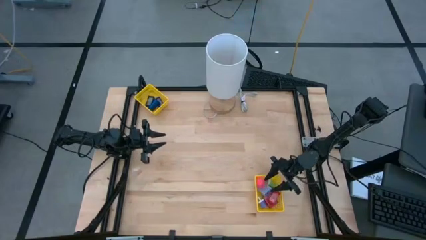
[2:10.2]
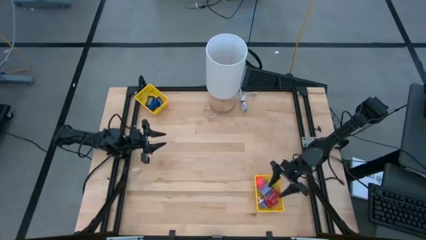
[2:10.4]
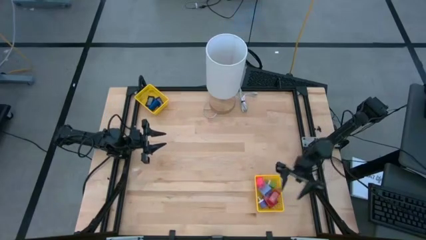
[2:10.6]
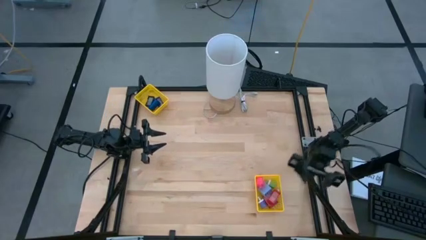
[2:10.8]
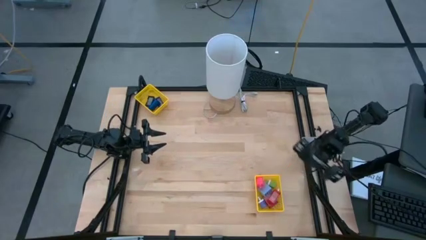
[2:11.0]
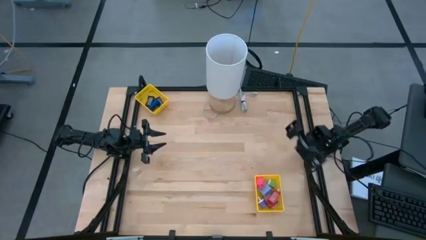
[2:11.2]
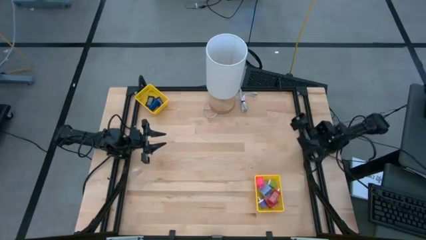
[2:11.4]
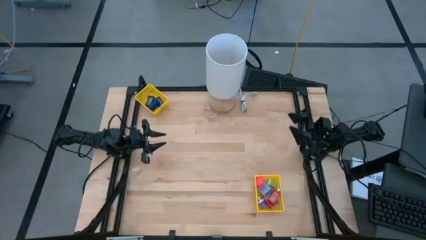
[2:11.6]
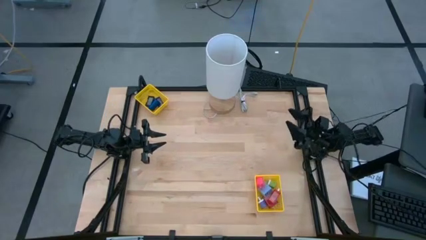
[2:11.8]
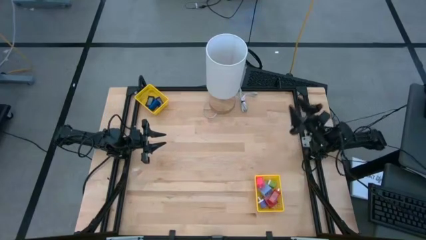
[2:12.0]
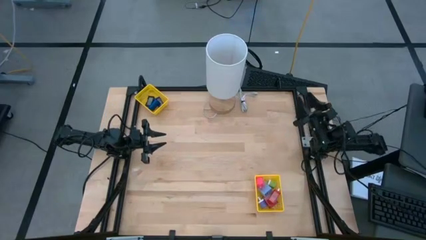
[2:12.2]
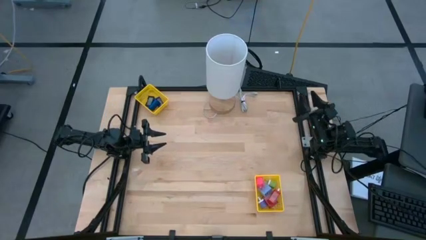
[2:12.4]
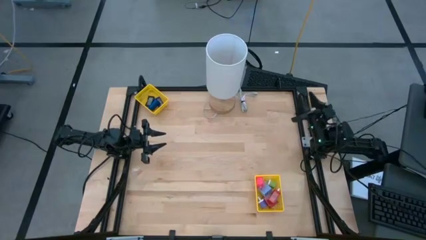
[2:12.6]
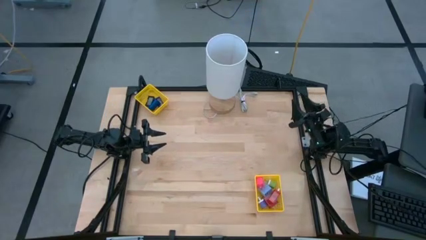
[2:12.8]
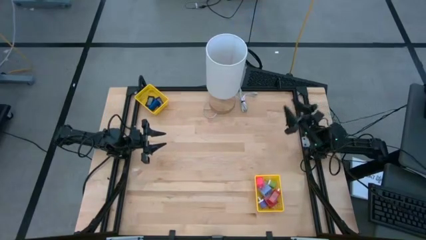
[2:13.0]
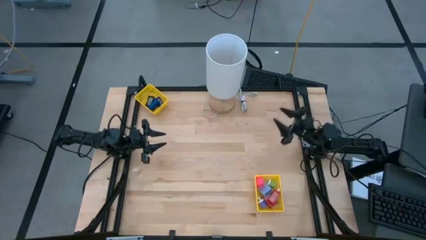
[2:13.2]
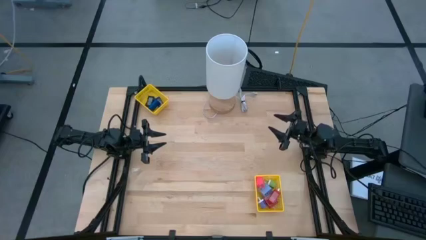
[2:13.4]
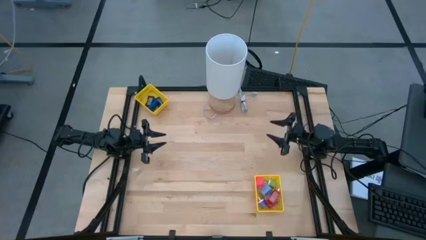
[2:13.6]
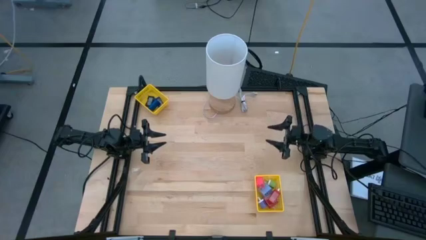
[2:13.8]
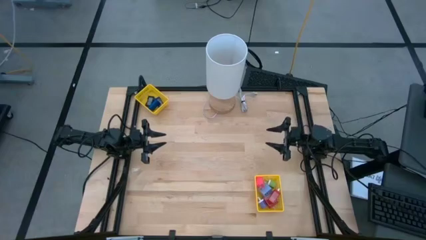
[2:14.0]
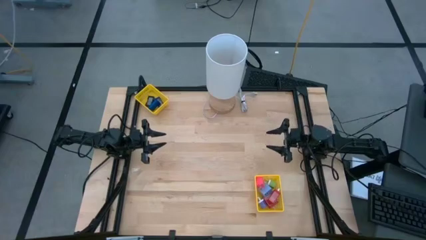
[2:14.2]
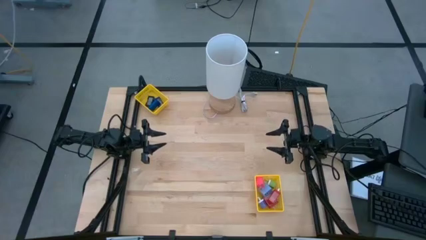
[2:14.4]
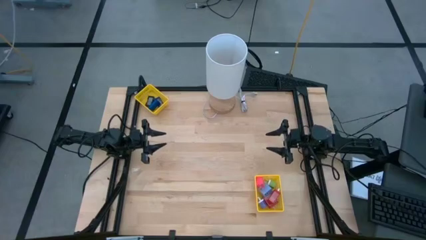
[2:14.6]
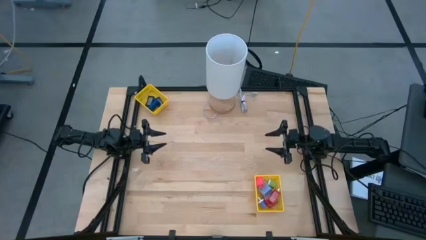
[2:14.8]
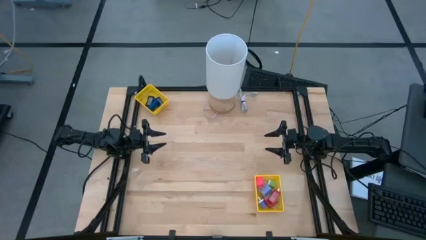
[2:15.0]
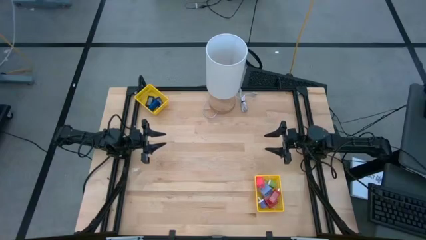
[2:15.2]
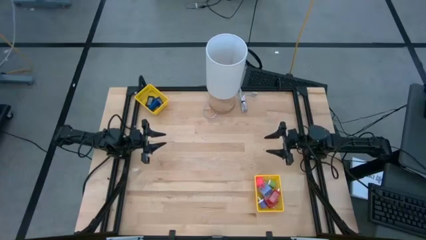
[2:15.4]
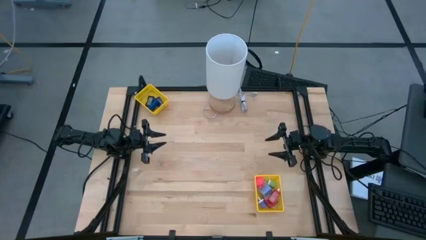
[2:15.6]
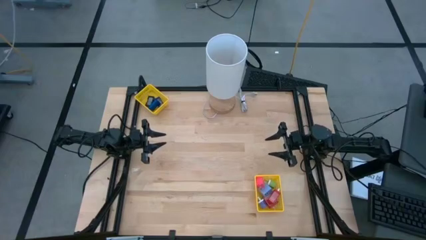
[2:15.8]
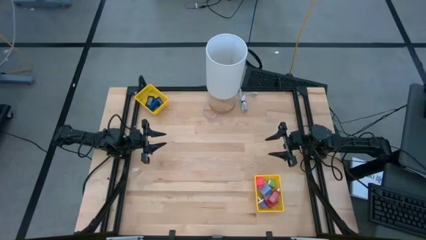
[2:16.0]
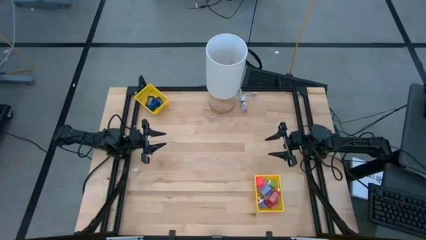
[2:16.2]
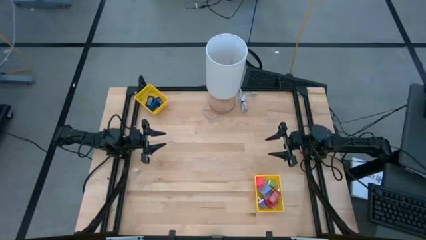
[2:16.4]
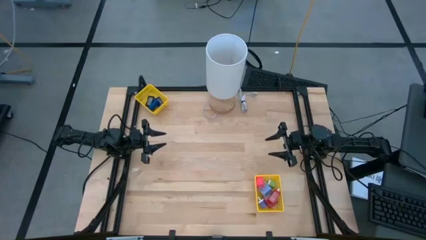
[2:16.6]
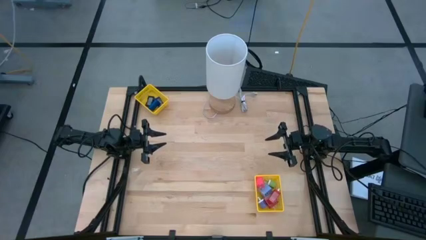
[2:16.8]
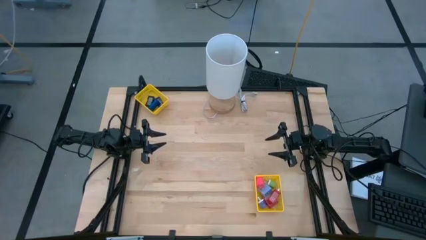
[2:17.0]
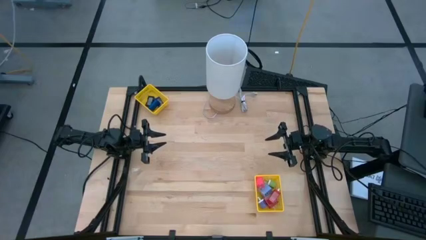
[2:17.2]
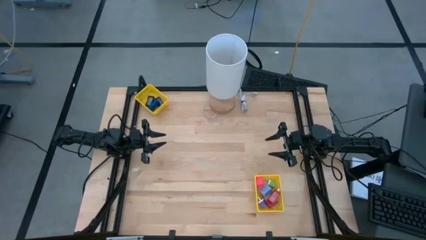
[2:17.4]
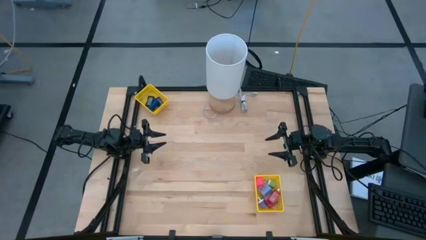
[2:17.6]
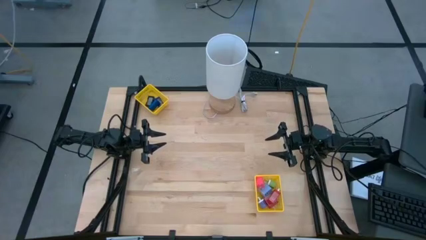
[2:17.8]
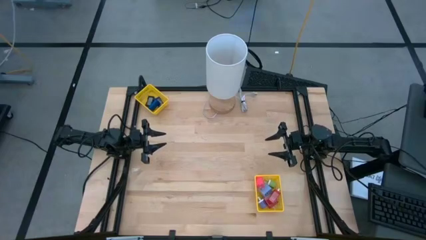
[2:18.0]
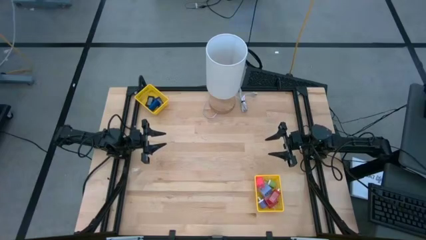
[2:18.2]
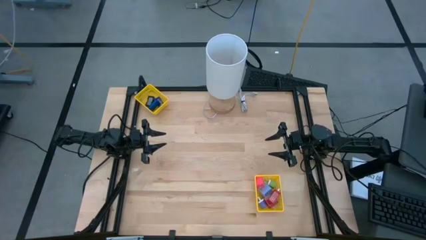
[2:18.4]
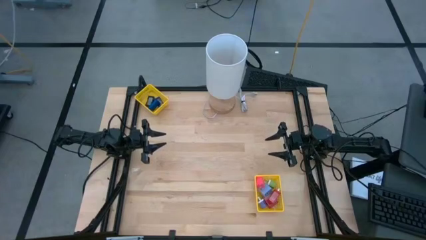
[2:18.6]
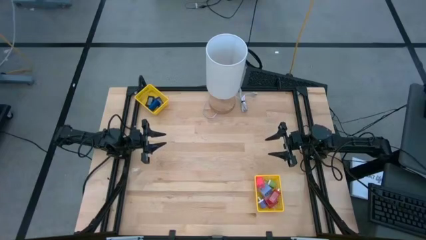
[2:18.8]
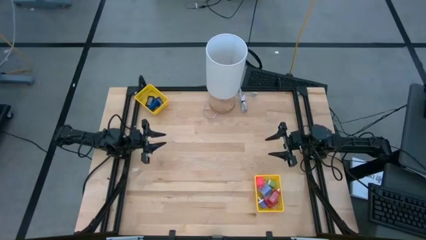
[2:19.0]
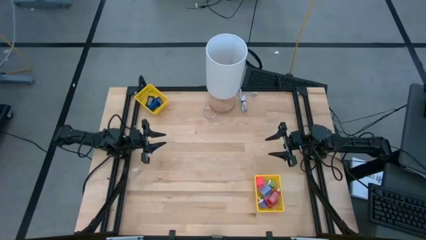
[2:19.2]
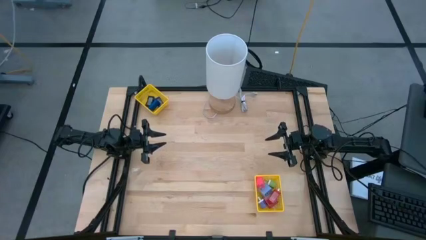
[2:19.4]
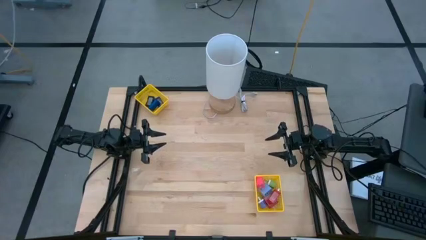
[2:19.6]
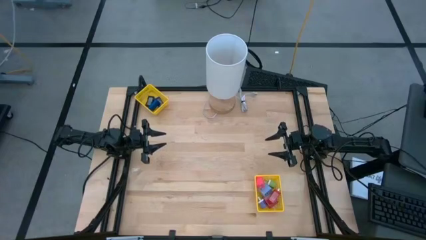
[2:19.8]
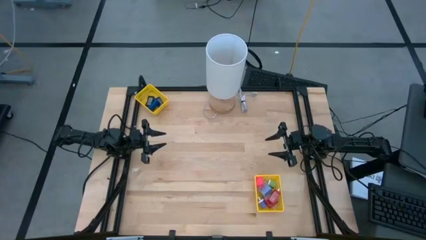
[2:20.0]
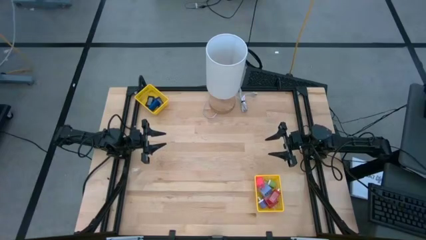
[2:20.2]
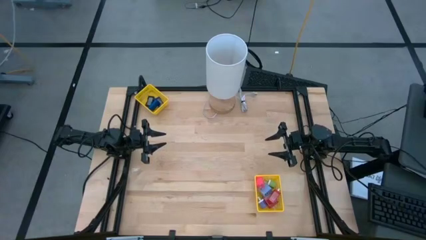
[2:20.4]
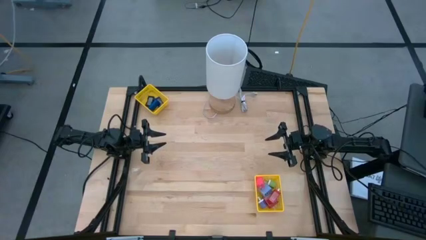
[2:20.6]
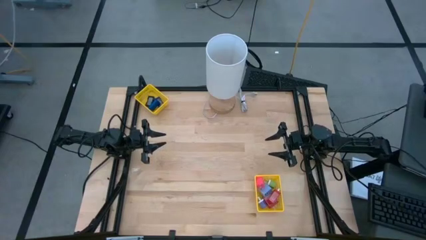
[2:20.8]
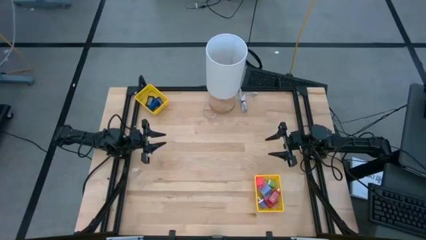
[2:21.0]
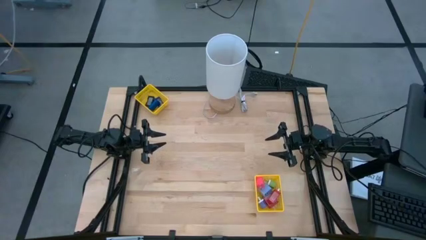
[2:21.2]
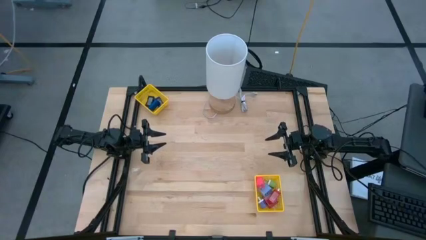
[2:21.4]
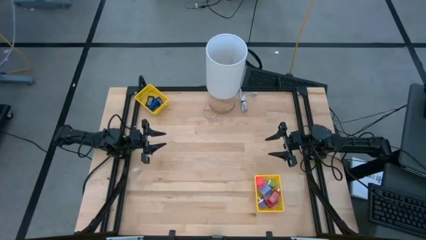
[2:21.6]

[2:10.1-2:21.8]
Task: Pick & Place Office items
Return to Home Position

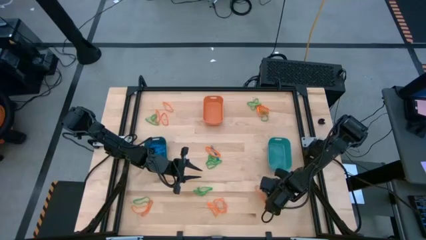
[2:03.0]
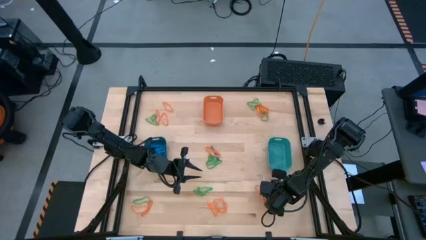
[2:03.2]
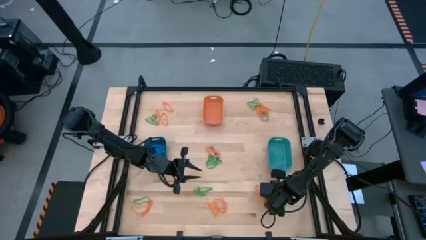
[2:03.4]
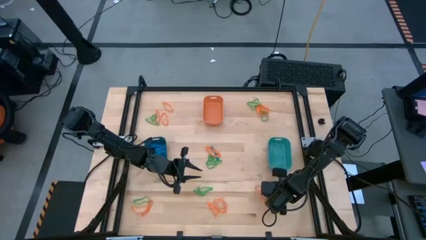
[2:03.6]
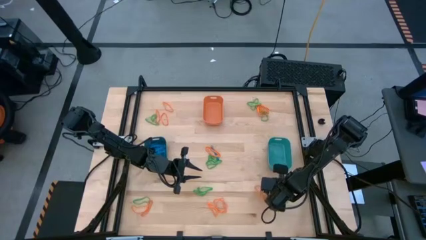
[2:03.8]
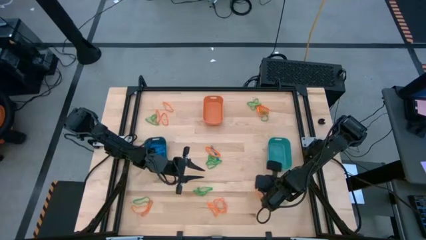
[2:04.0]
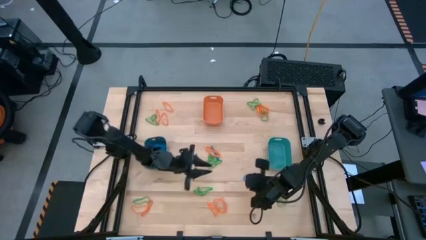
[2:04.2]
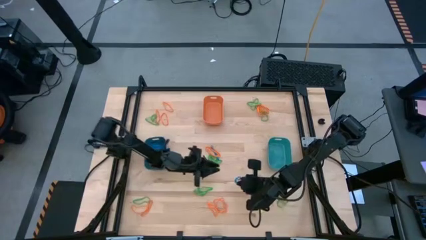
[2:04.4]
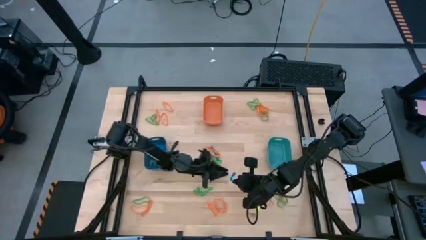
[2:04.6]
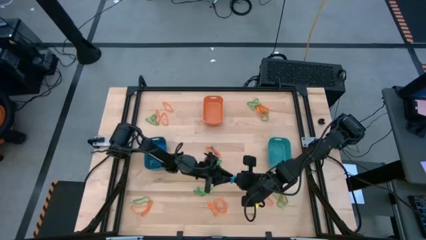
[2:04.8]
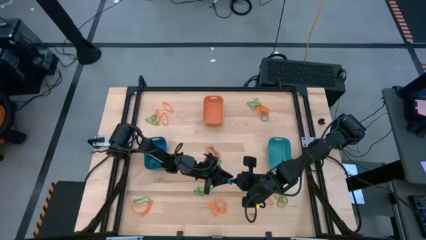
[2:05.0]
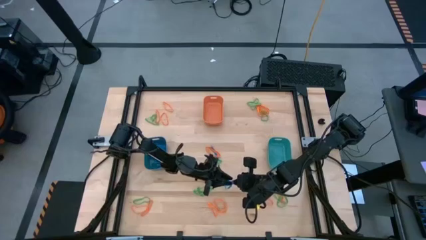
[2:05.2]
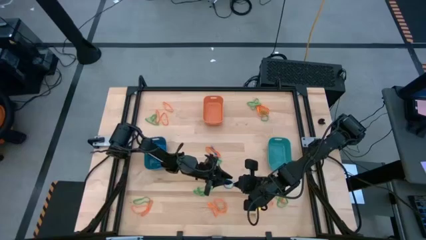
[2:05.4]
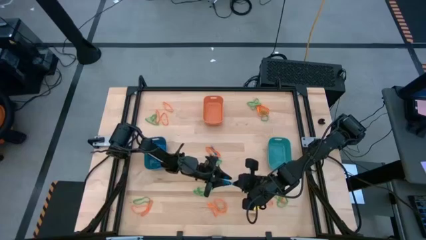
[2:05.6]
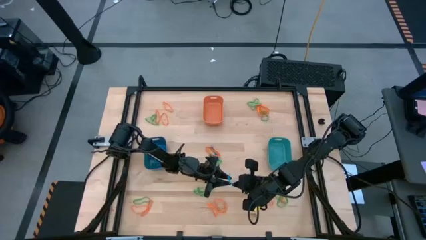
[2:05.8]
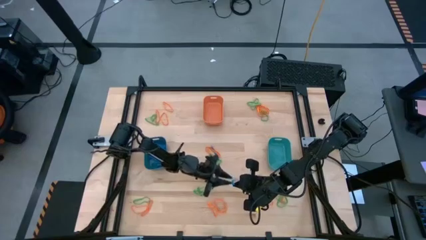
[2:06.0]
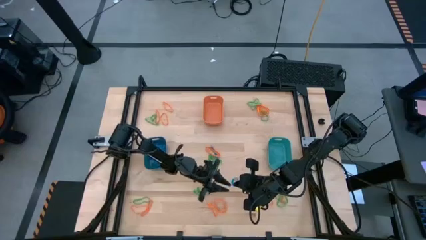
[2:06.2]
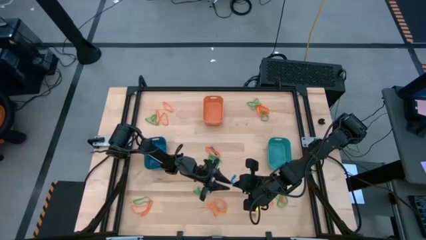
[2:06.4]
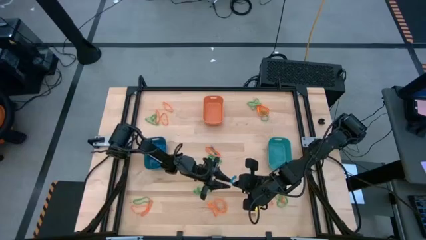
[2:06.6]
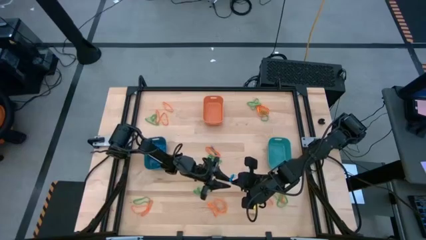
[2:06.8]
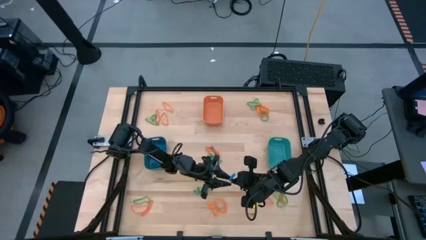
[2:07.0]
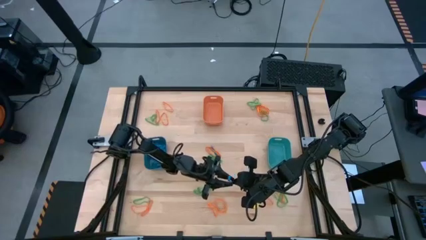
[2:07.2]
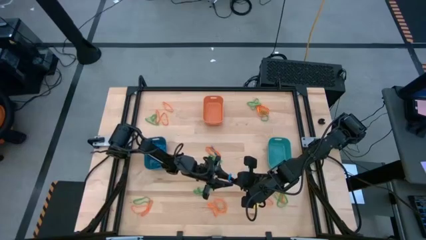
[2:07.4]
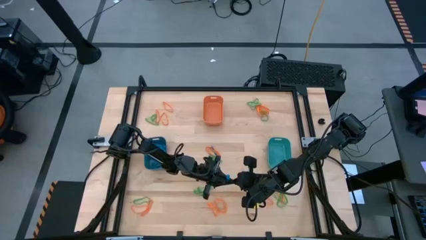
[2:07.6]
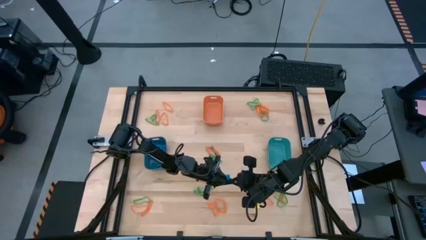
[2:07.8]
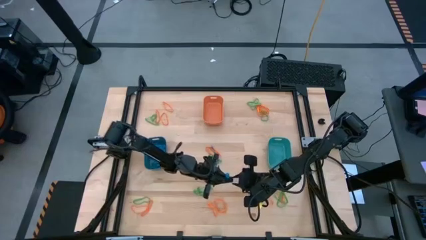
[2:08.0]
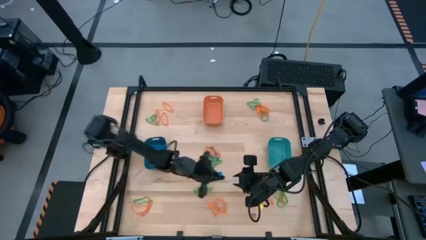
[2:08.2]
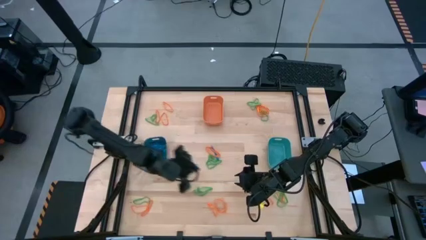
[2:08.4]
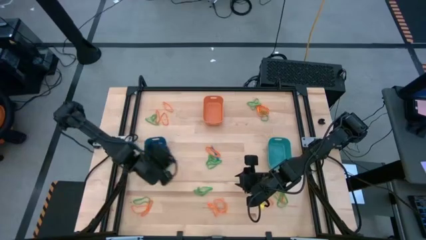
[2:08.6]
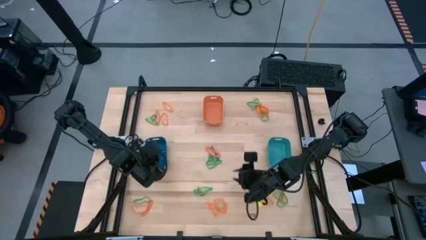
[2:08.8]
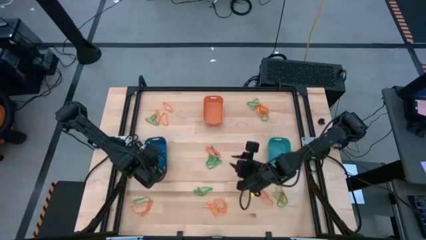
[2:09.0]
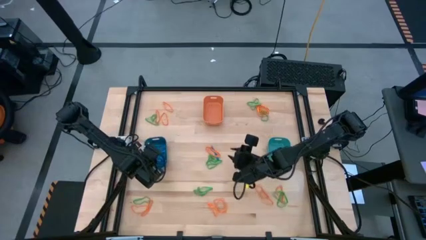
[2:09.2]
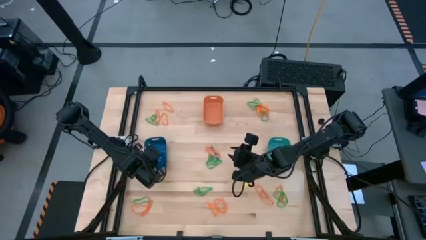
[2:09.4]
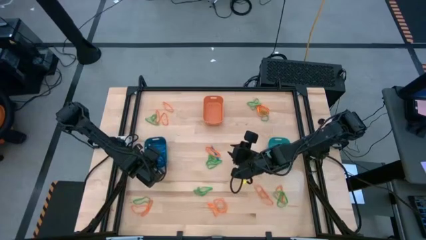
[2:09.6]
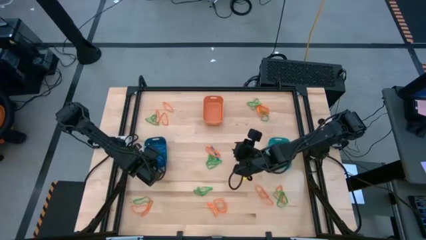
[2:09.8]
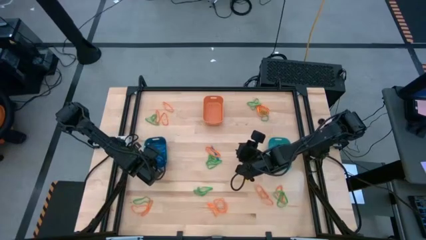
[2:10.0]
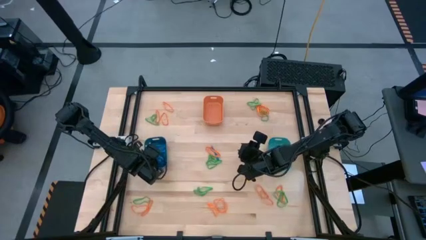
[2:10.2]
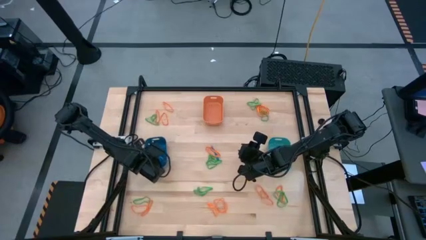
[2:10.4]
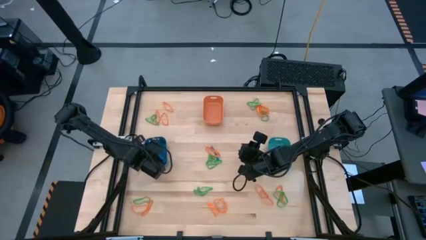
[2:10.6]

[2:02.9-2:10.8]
Task: Sort rubber bands into baskets
Put the blue rubber band into the blue bin
